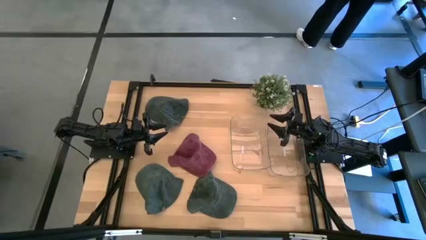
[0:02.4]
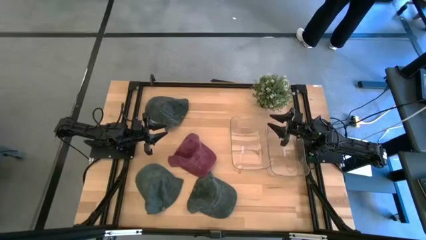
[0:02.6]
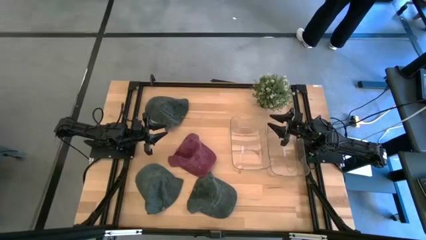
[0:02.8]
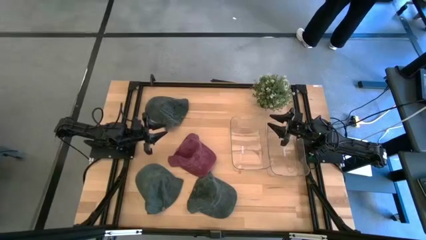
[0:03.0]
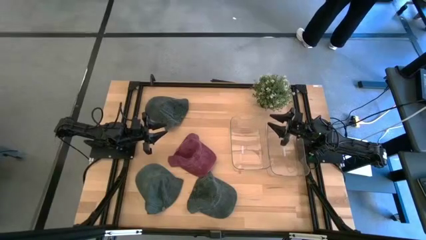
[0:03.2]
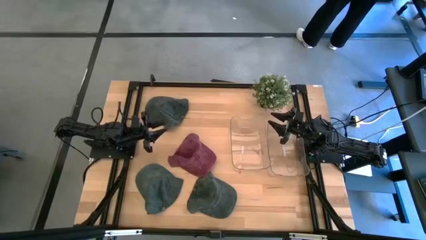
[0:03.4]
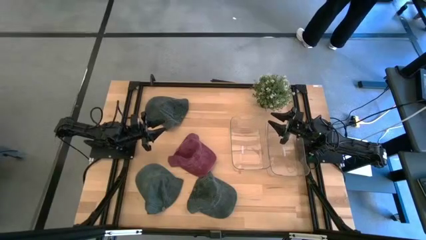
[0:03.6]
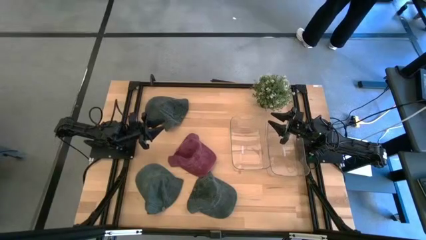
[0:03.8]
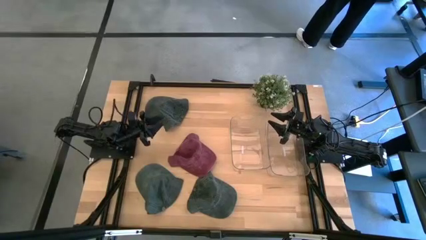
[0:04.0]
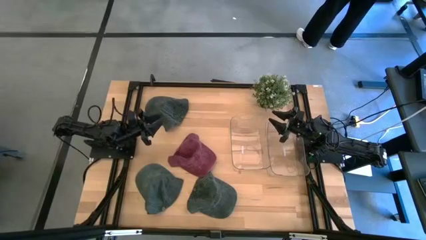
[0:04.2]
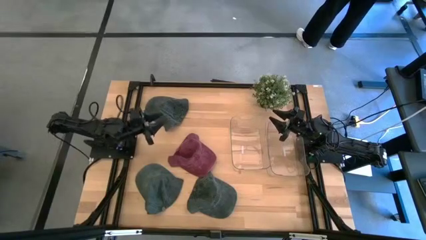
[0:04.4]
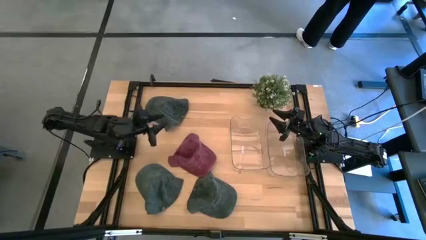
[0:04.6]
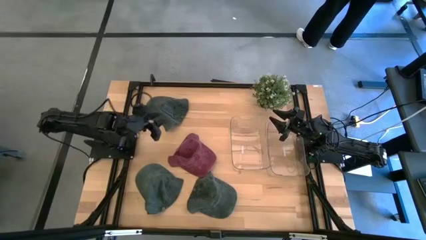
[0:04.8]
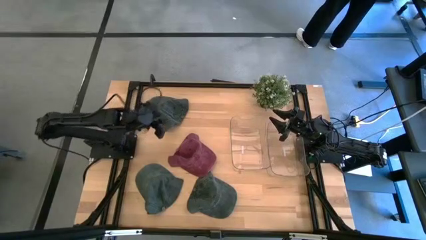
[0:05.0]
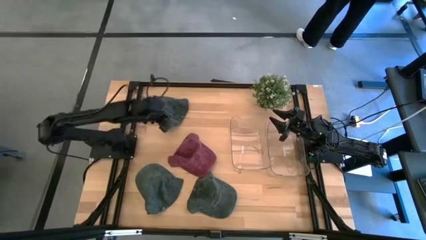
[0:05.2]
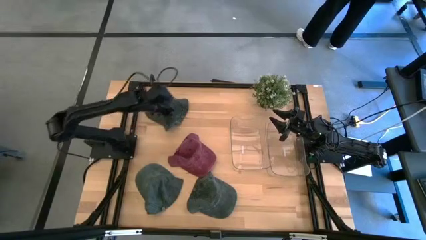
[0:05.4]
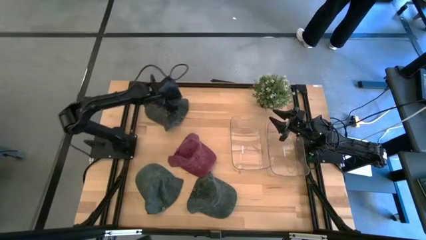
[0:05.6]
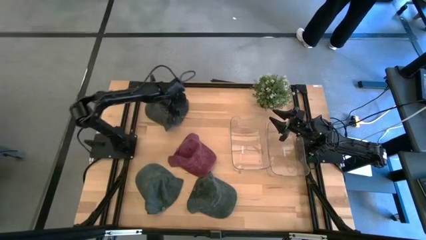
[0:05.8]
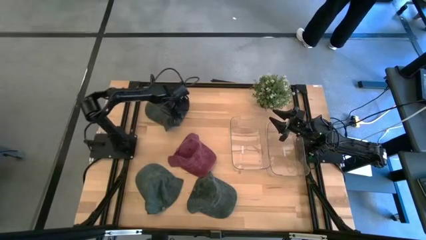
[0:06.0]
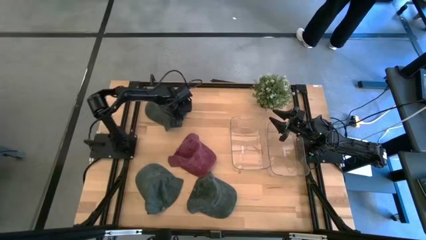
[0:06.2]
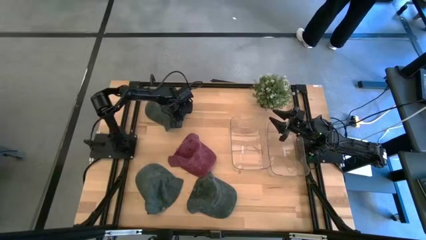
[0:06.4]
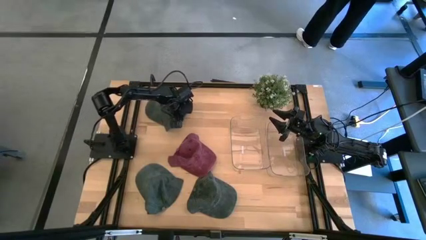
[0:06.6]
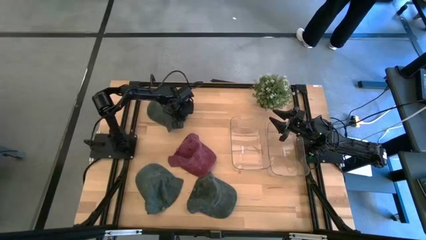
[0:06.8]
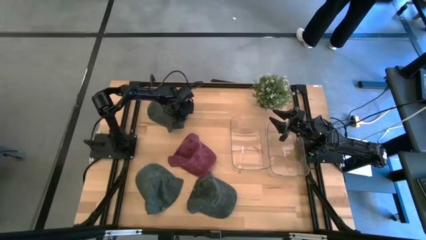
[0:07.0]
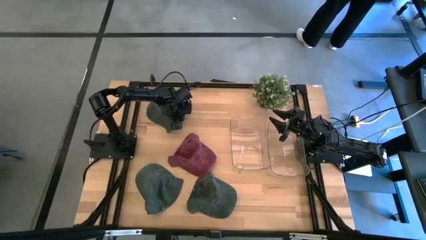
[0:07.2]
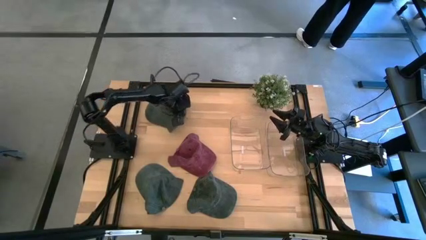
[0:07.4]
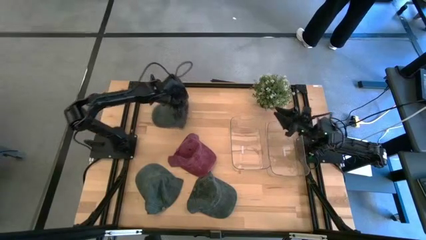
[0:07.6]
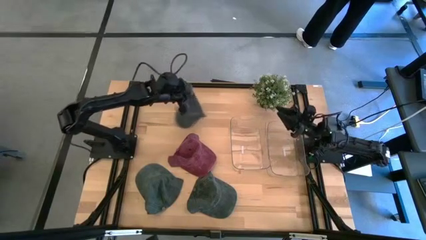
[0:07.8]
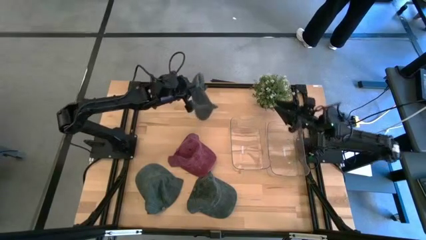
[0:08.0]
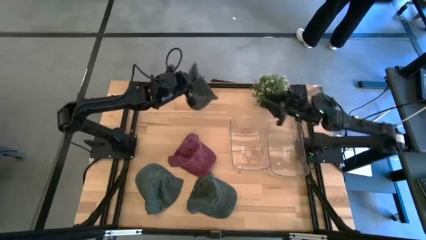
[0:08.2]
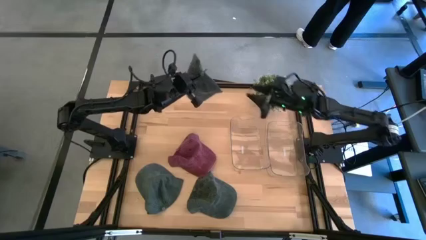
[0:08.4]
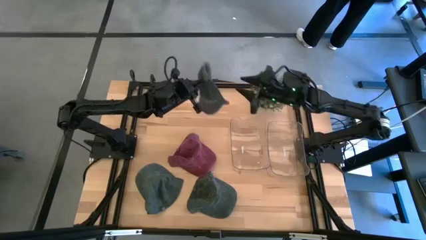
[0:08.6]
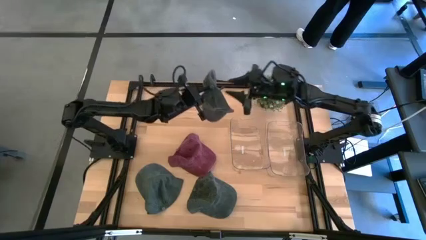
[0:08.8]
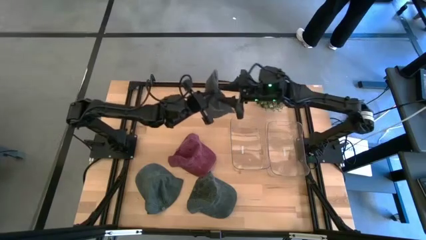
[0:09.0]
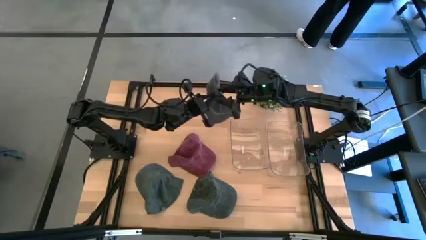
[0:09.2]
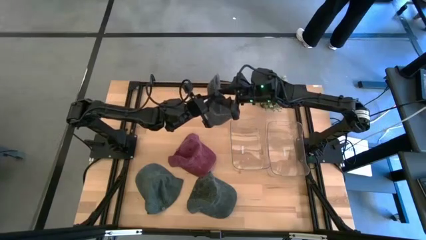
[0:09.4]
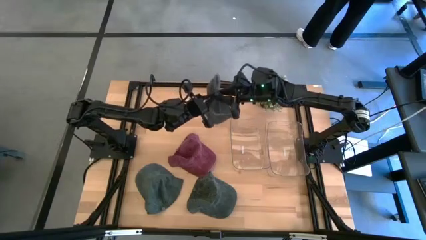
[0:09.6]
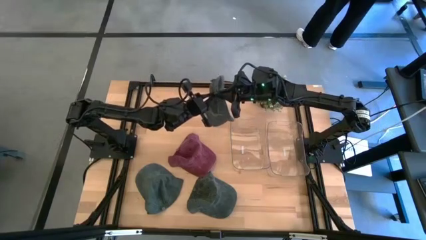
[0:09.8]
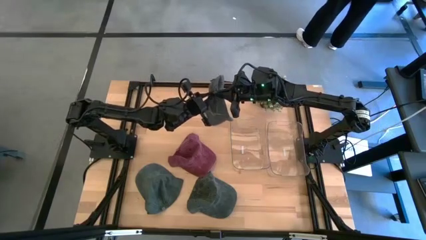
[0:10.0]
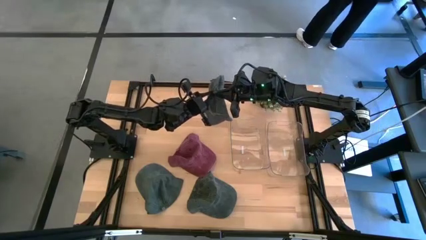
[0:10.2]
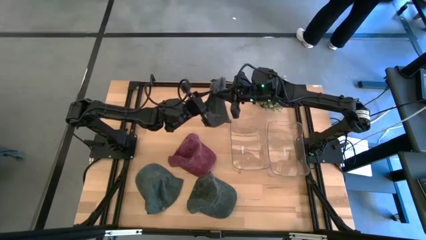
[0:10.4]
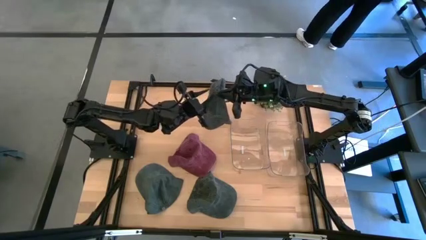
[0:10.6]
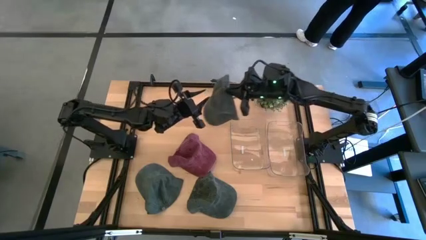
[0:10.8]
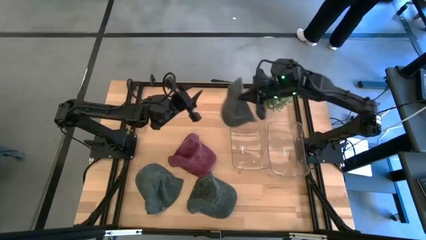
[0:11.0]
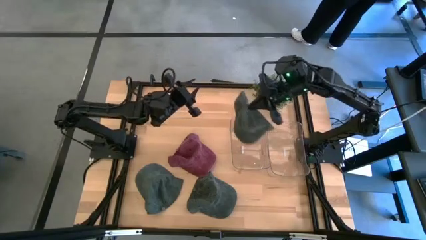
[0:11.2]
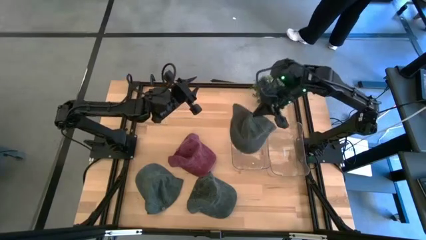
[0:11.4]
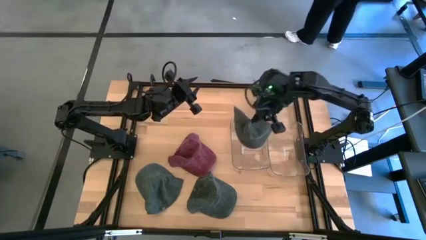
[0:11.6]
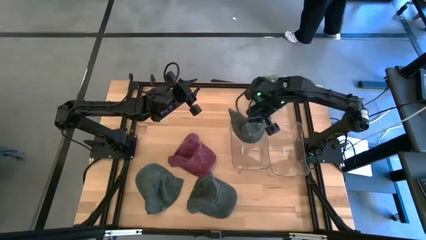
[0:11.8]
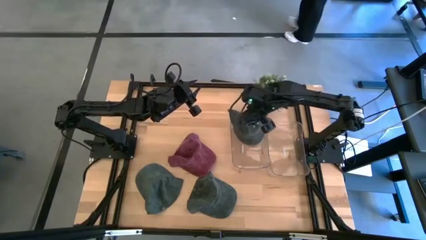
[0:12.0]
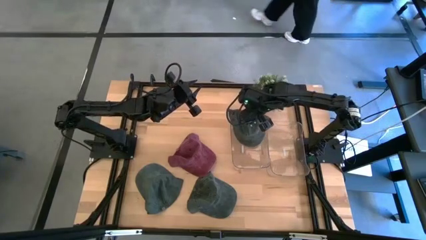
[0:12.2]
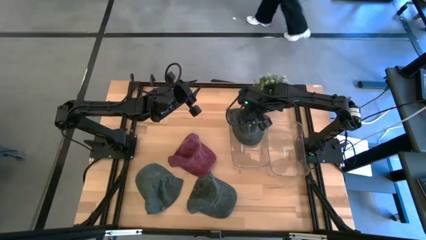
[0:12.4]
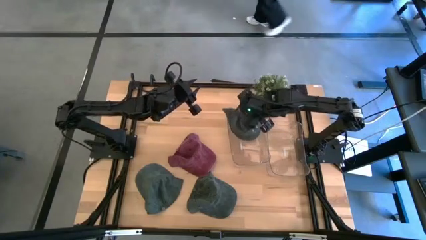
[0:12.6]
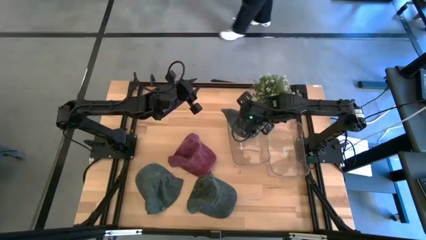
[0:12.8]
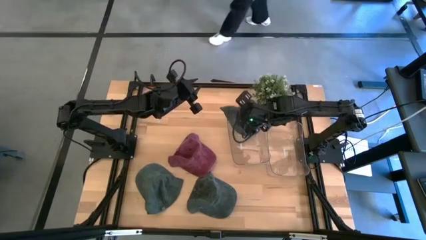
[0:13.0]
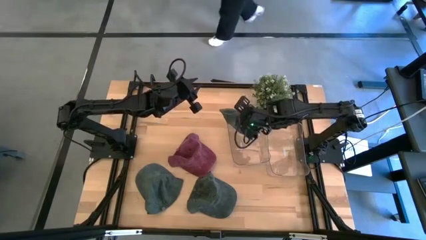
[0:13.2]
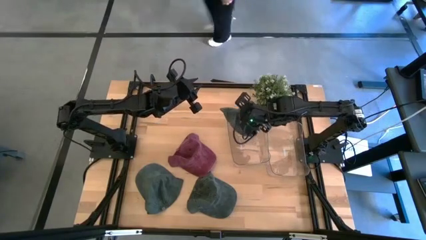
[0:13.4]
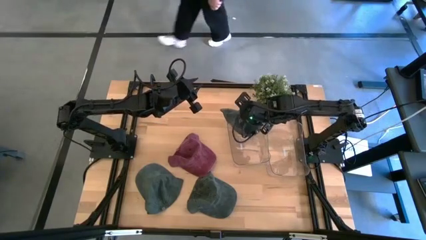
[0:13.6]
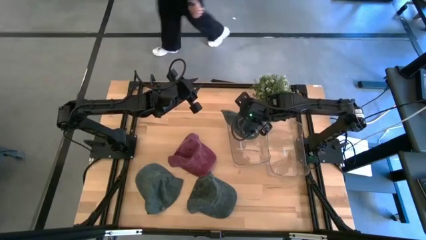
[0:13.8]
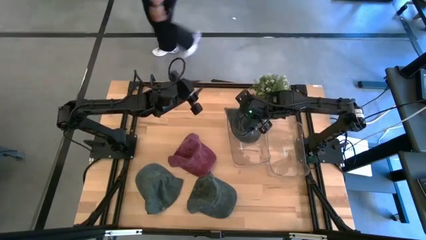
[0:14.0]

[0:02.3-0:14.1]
Task: Pick & Place hat
Put the top left black cap into the left transparent bin
